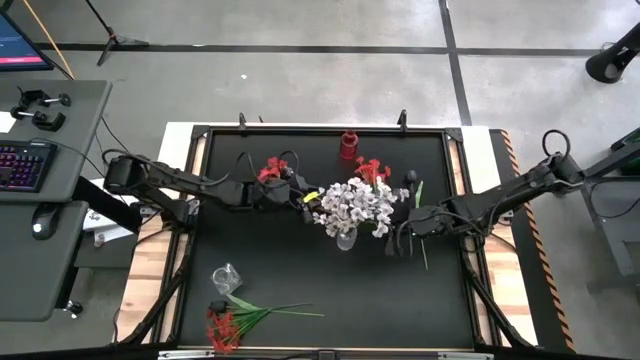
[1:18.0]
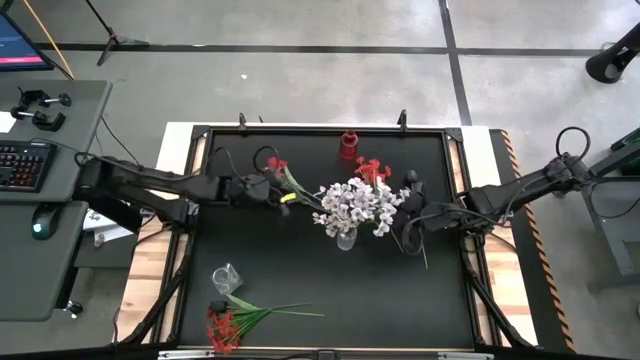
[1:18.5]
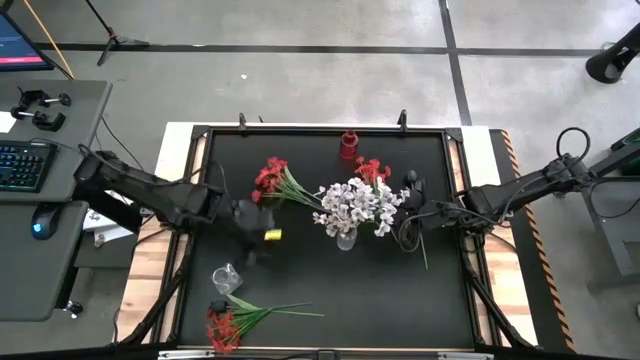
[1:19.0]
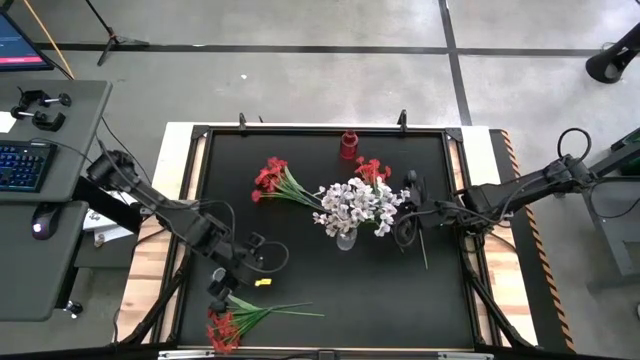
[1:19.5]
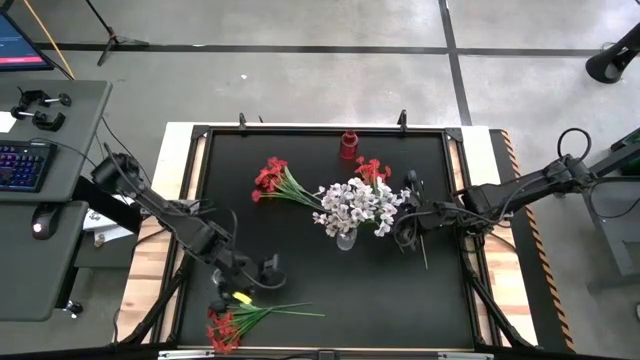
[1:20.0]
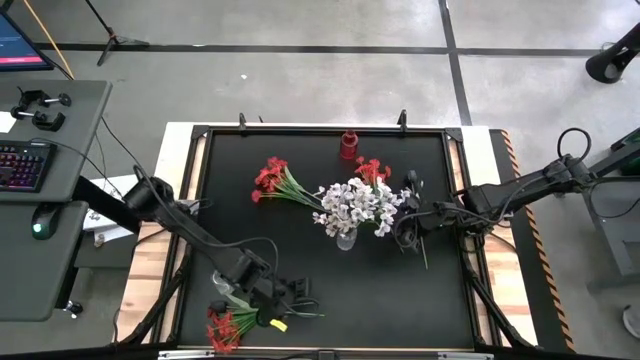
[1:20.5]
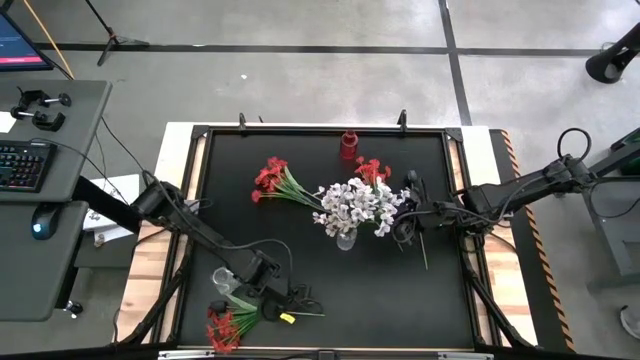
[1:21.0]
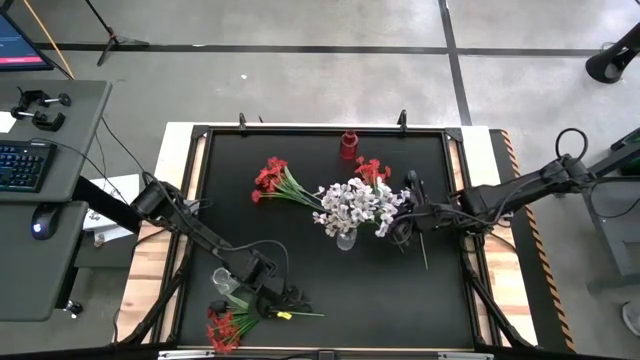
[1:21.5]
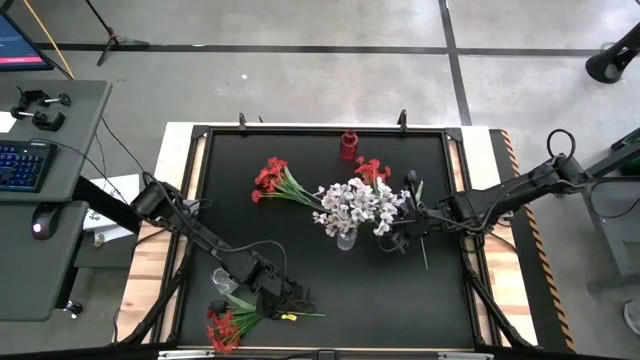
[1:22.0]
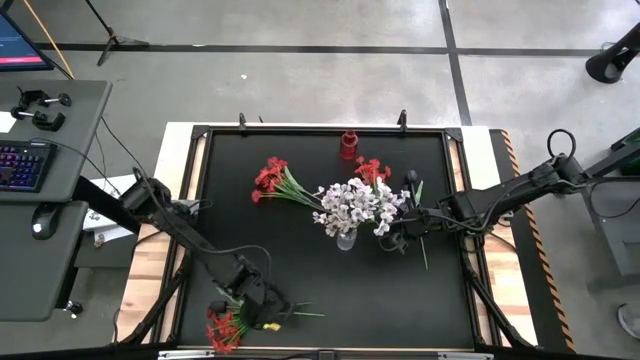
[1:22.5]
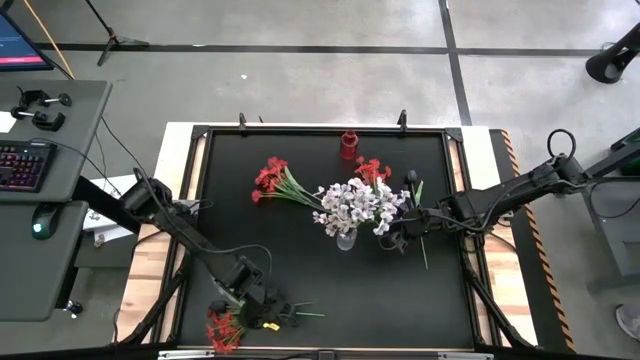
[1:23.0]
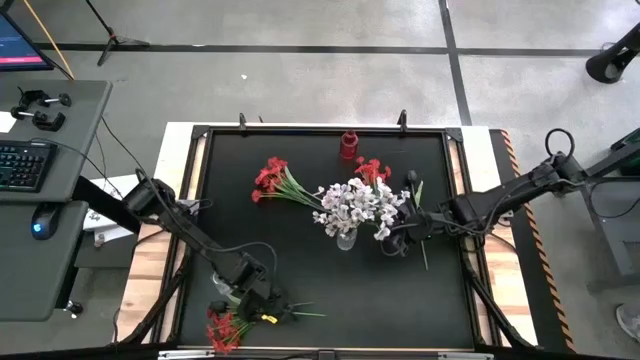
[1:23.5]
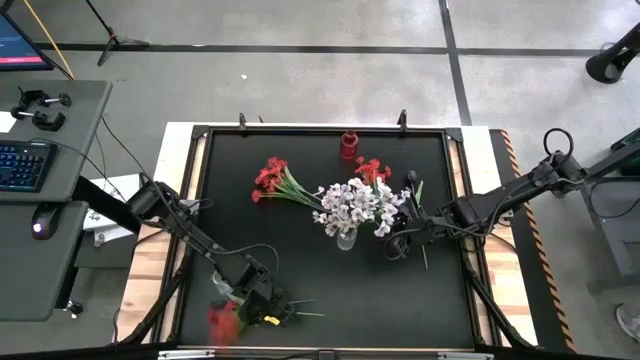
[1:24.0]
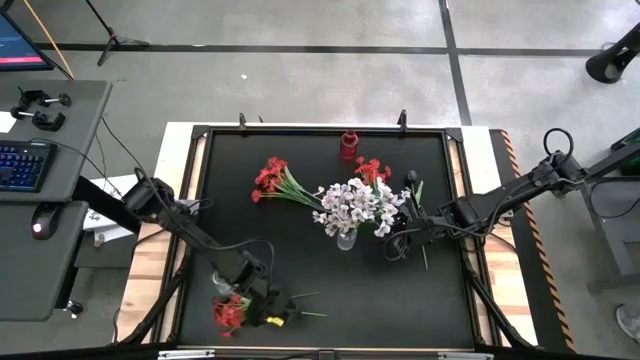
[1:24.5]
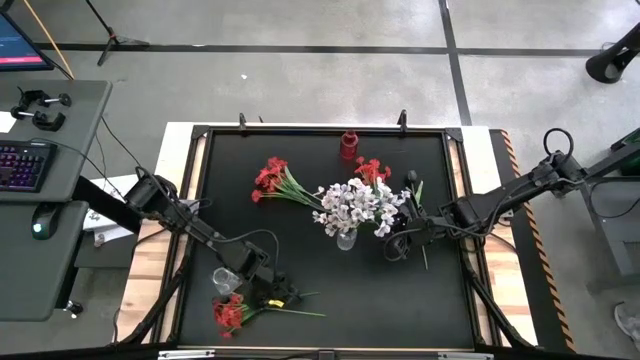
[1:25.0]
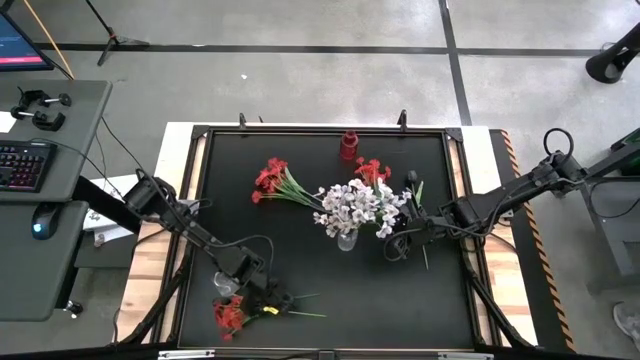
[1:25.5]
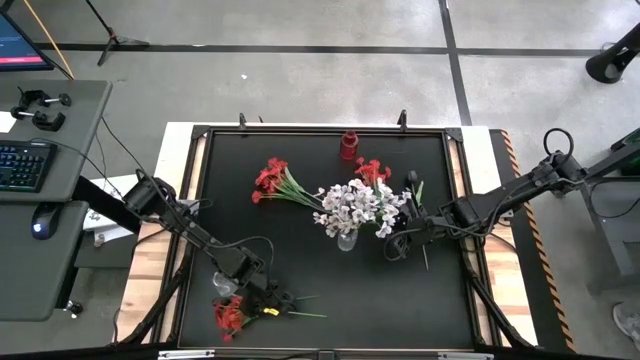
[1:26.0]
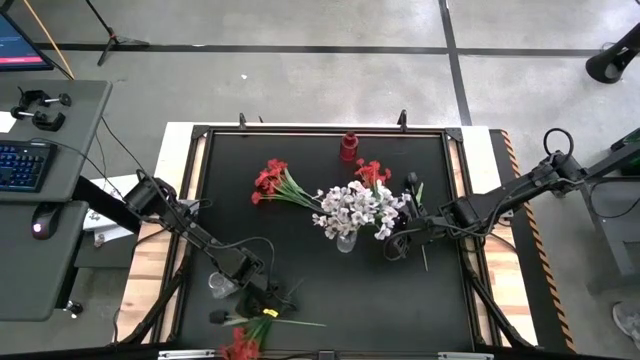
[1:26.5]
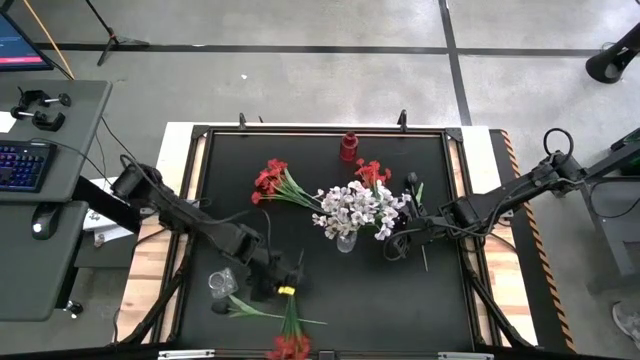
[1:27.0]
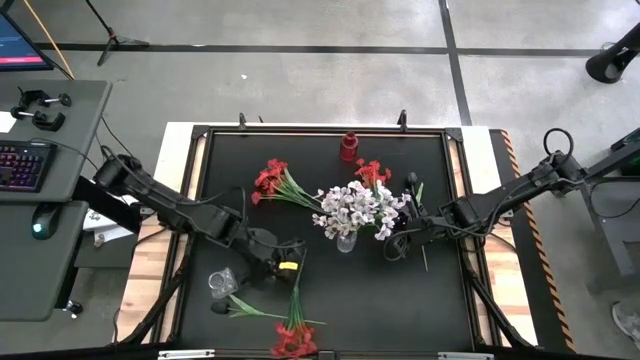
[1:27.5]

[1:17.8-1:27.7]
Task: Sort flowers into vase by color
Put the bottom red flowers into the left transparent vase

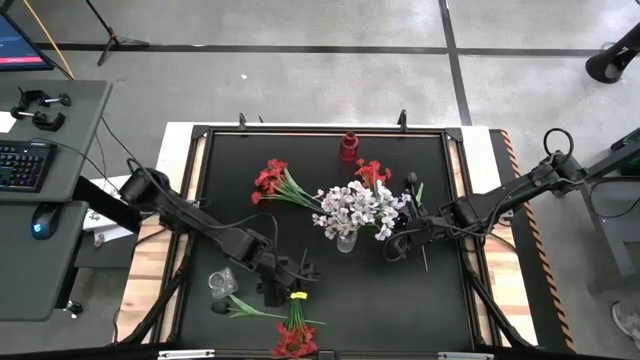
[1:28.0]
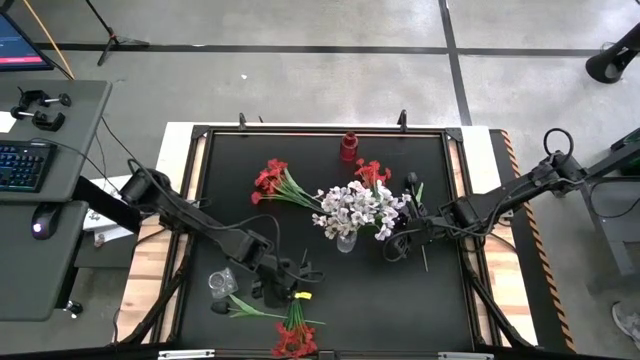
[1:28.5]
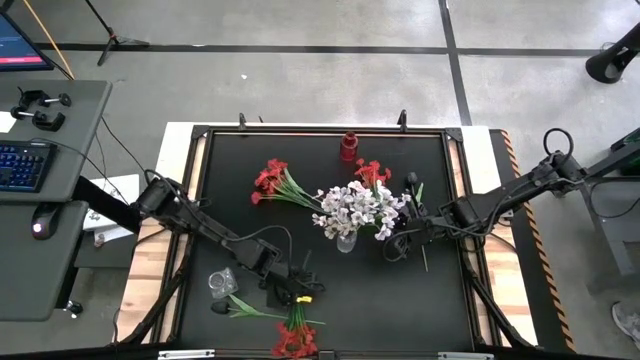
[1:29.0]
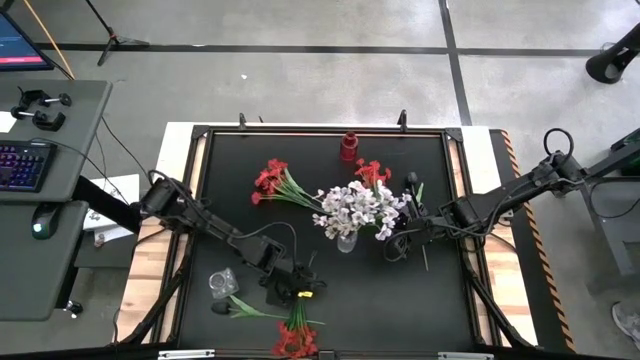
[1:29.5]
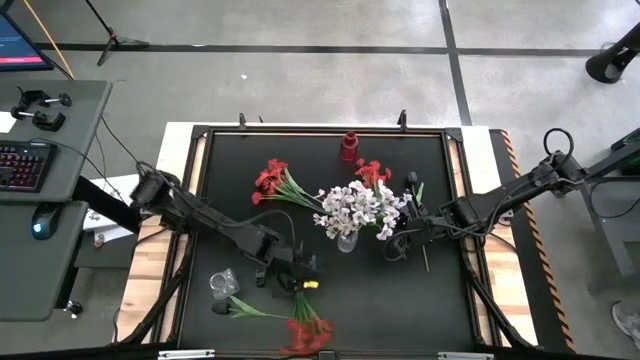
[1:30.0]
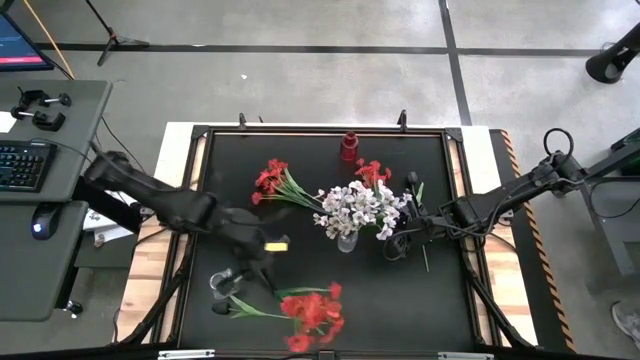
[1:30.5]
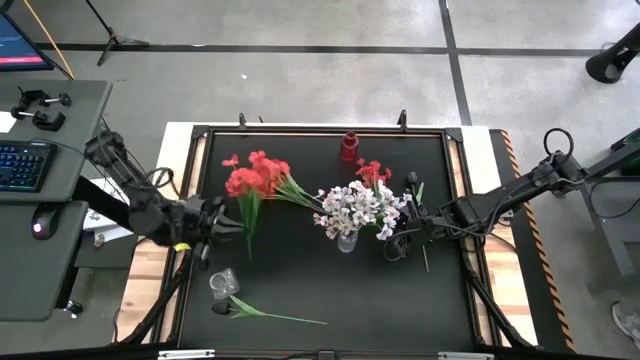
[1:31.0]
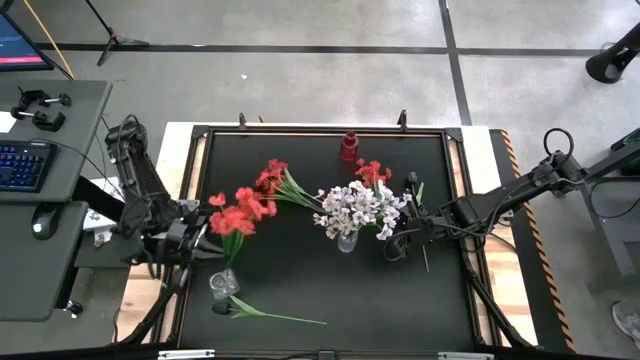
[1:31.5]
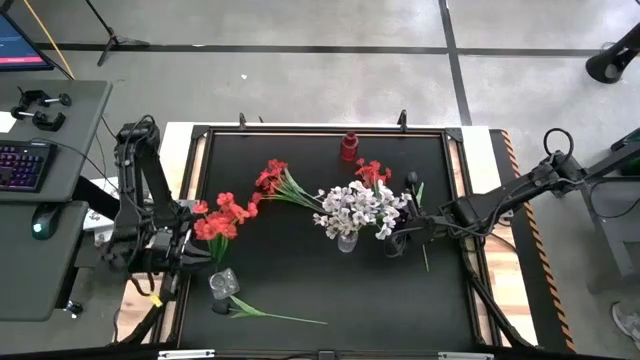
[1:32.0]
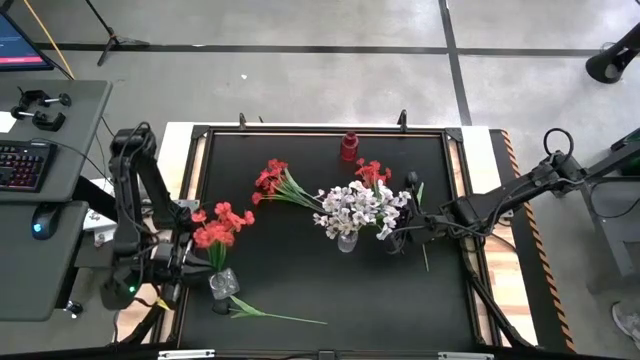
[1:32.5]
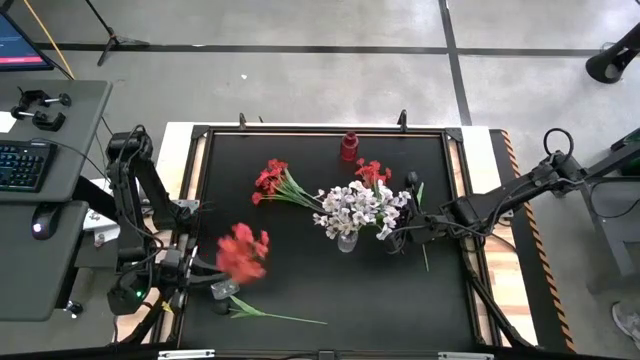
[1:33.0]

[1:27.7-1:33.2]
Put the bottom red flowers into the left transparent vase

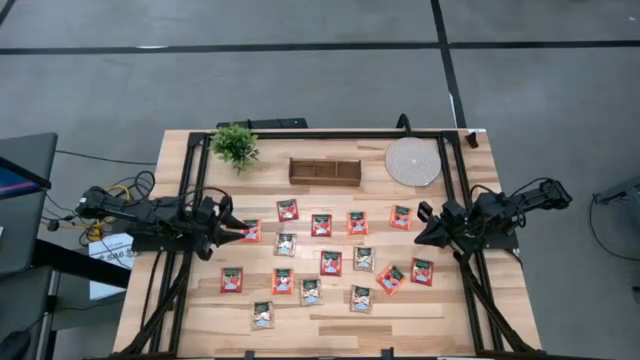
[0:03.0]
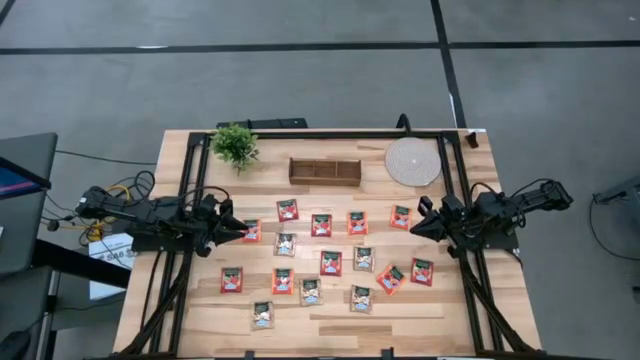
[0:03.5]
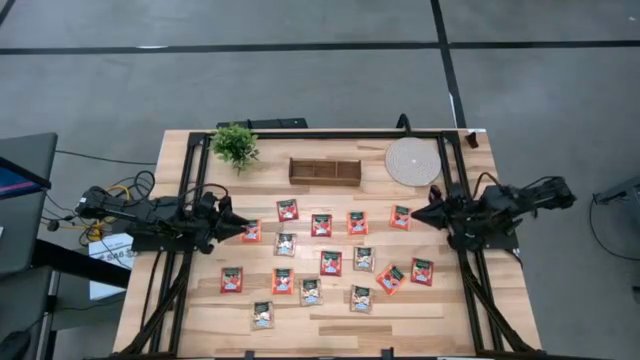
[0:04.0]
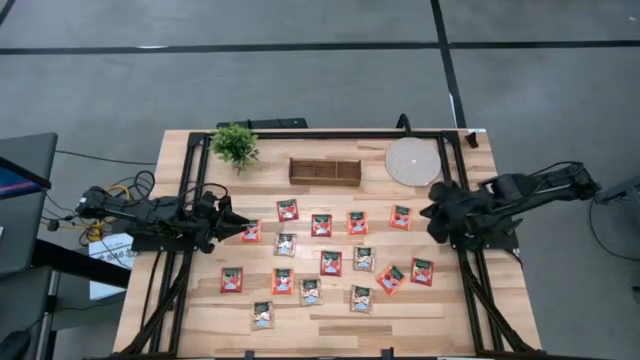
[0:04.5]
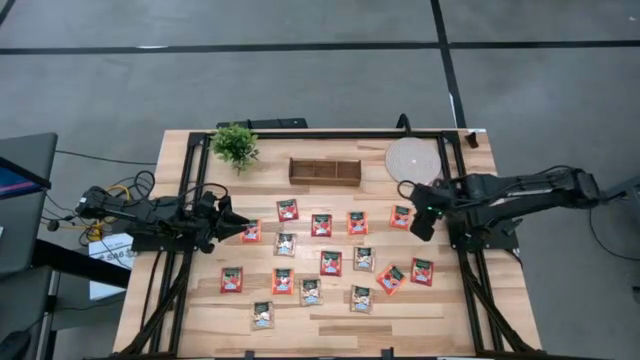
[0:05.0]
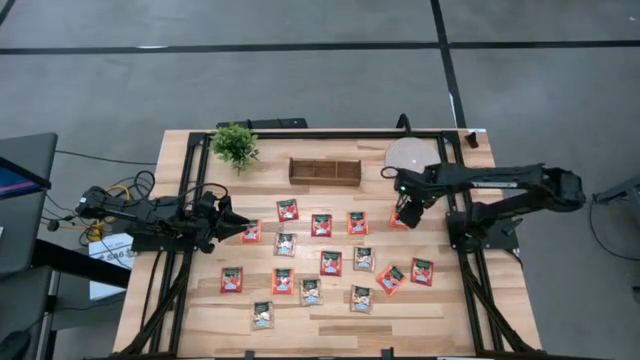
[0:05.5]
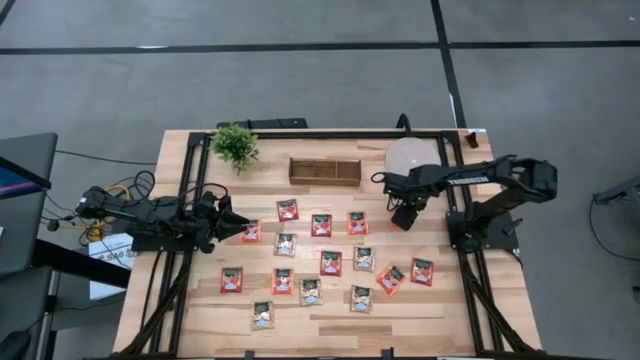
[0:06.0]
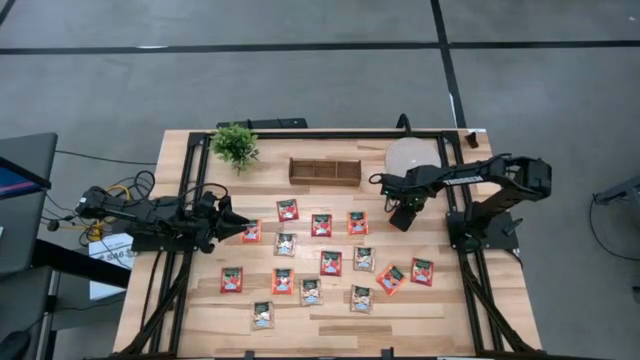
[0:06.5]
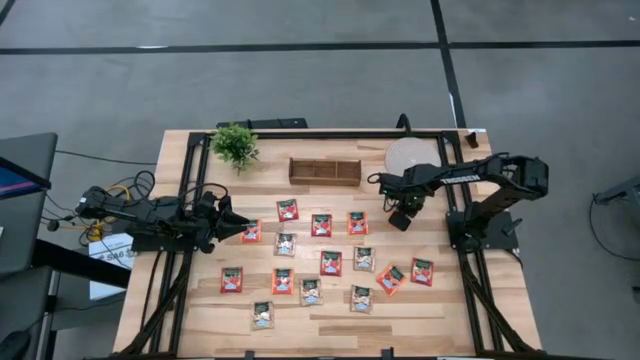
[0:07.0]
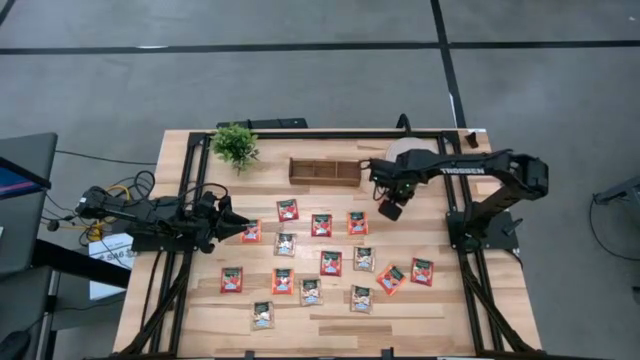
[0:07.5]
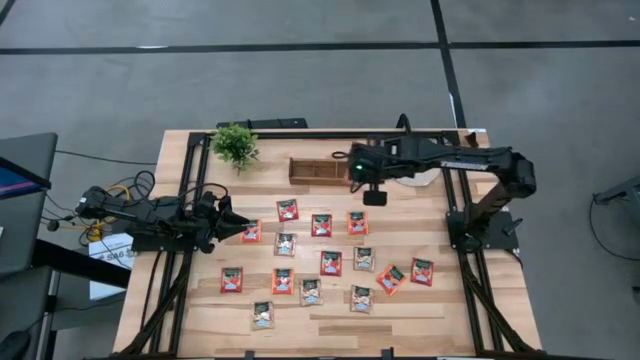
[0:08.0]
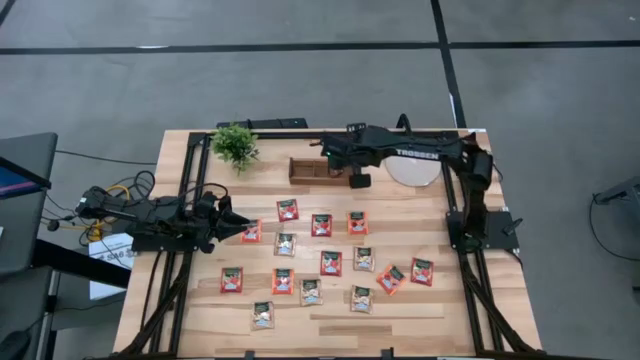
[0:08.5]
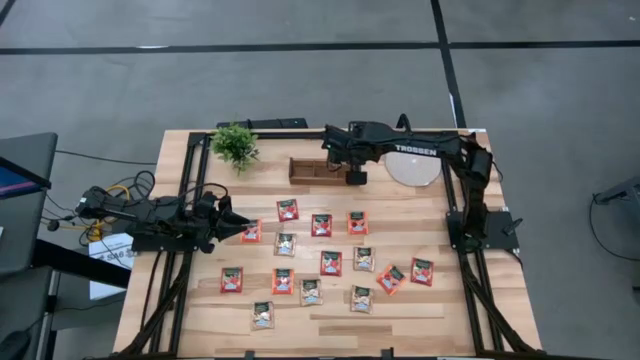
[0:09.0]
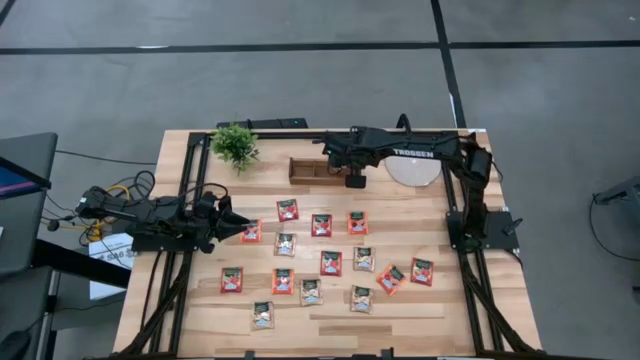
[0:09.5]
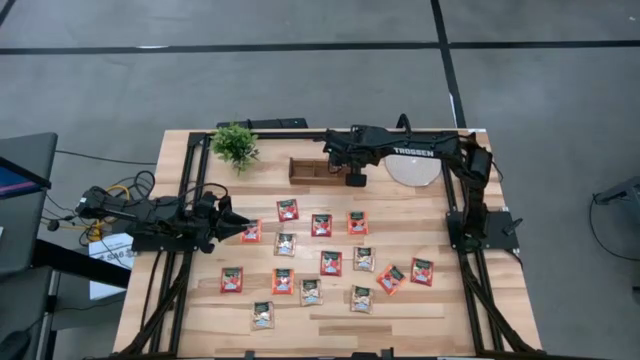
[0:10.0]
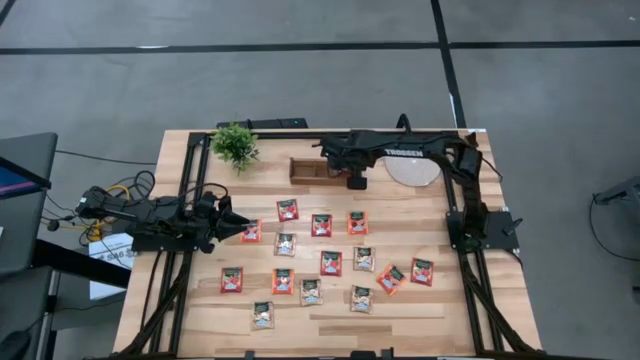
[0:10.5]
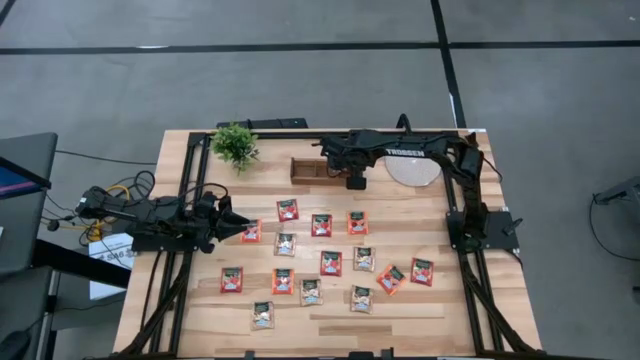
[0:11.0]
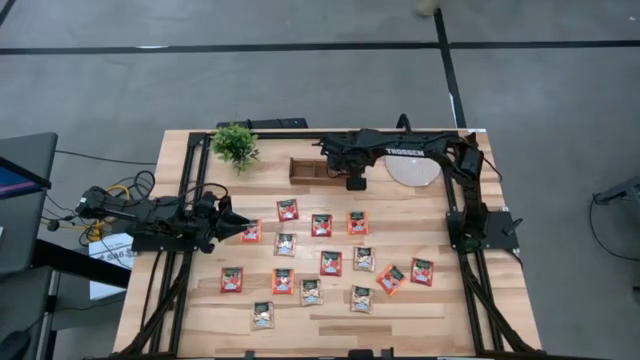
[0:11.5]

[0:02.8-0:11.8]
Task: Pick & Place Tea
Put the orange tea bag into the right section of the wooden organizer
